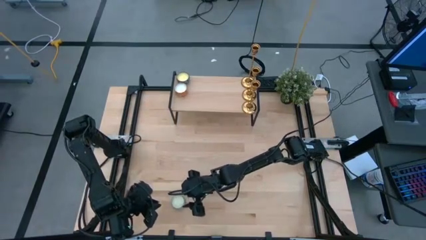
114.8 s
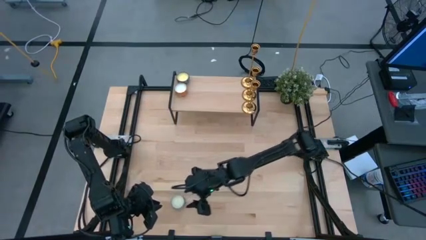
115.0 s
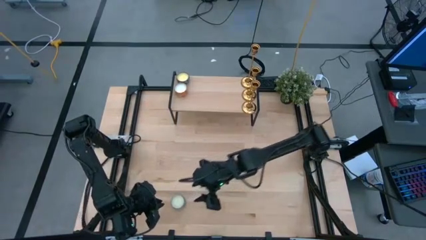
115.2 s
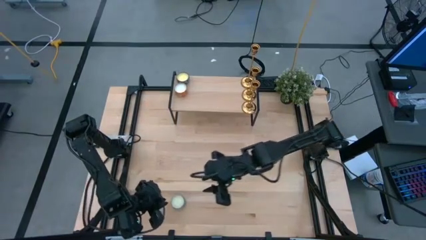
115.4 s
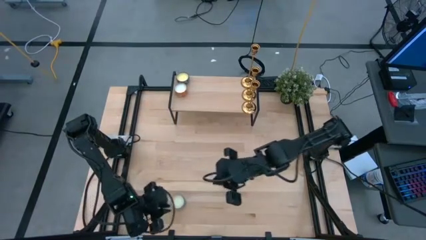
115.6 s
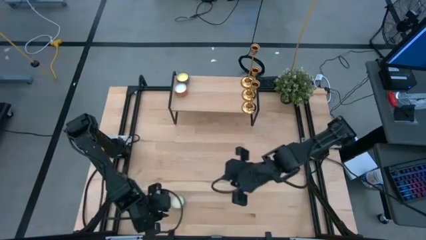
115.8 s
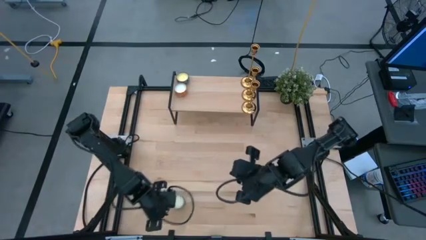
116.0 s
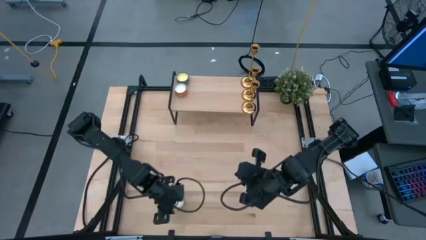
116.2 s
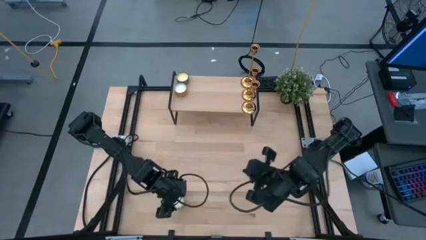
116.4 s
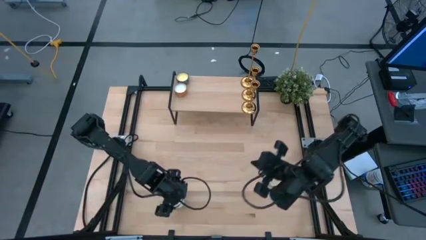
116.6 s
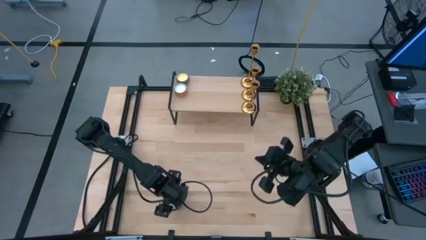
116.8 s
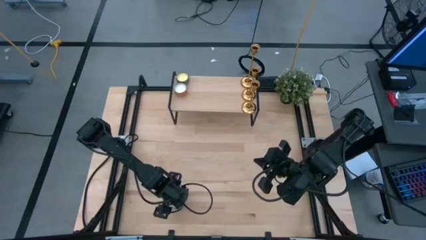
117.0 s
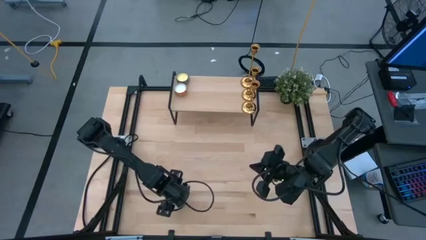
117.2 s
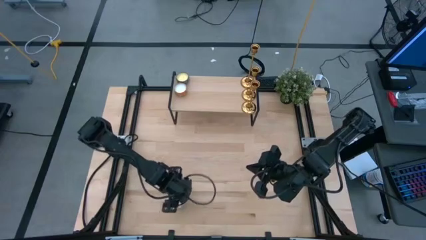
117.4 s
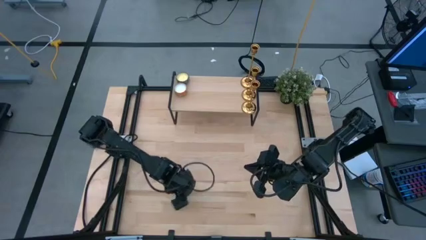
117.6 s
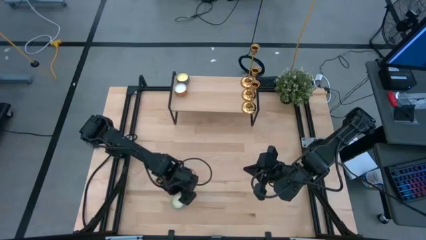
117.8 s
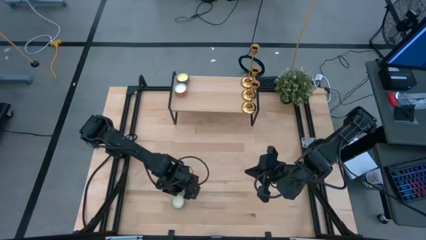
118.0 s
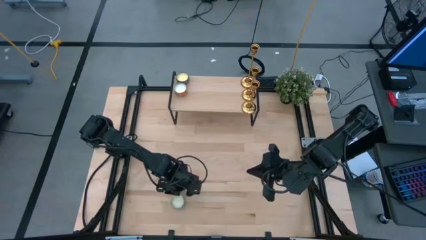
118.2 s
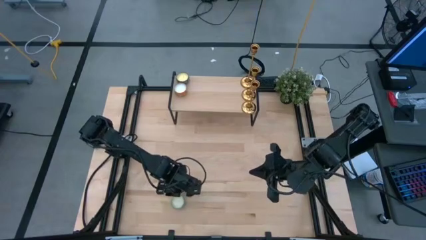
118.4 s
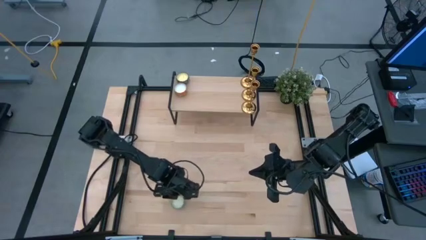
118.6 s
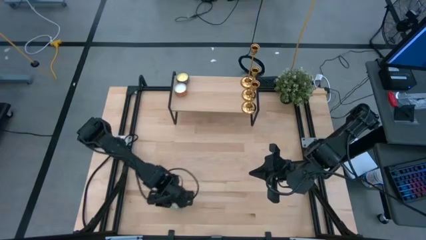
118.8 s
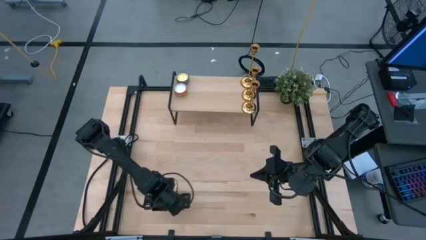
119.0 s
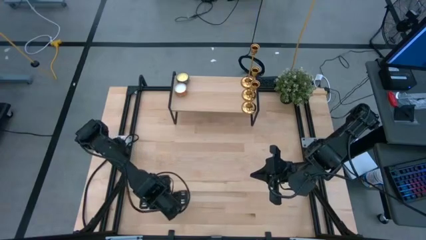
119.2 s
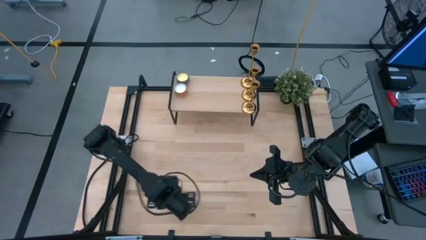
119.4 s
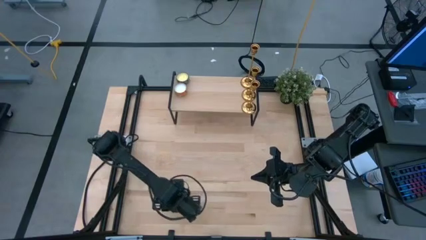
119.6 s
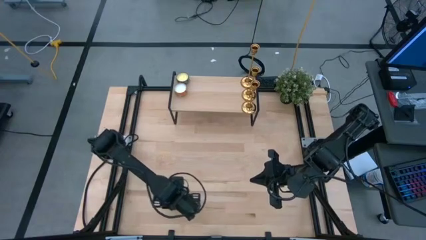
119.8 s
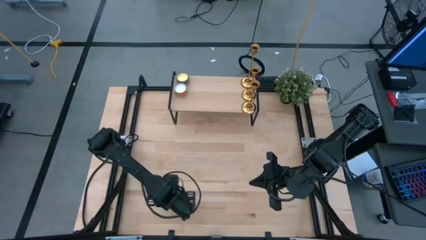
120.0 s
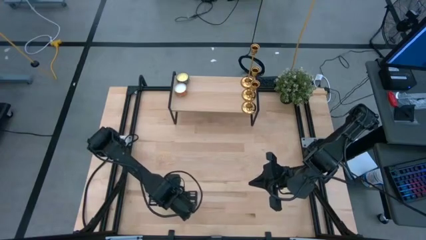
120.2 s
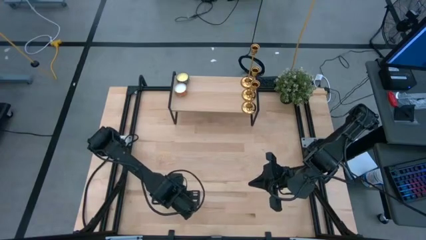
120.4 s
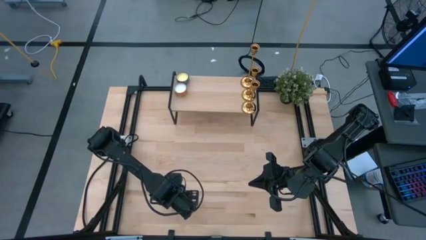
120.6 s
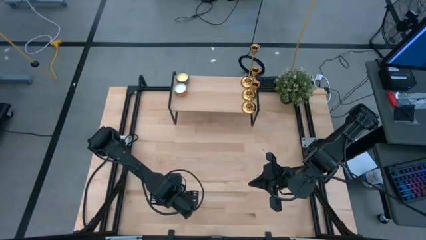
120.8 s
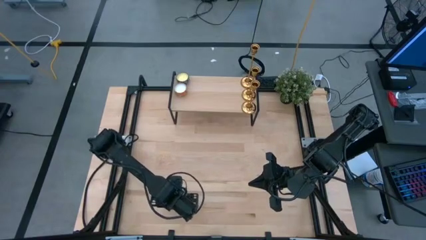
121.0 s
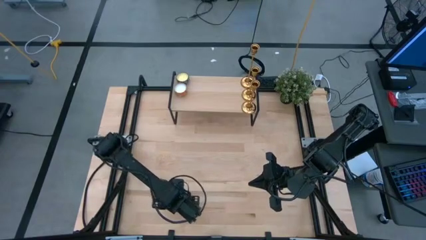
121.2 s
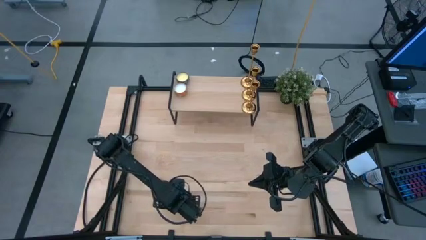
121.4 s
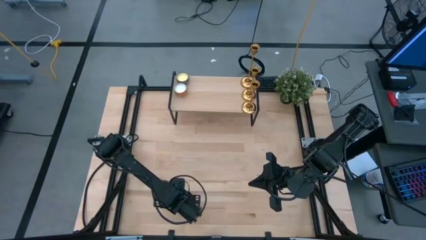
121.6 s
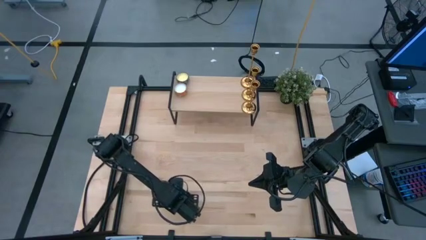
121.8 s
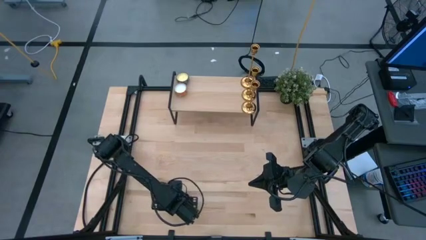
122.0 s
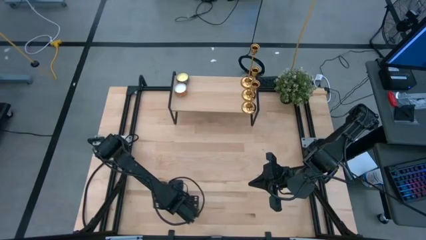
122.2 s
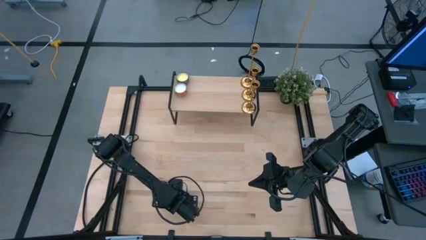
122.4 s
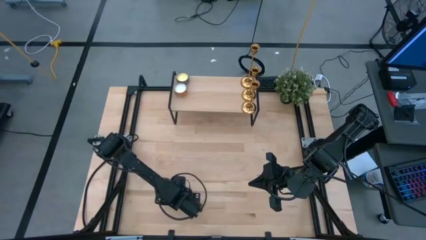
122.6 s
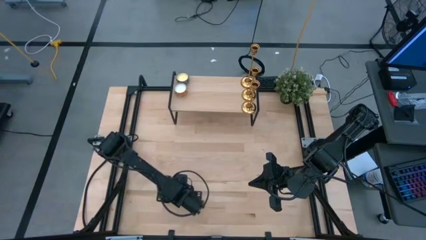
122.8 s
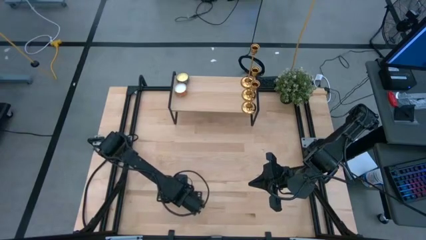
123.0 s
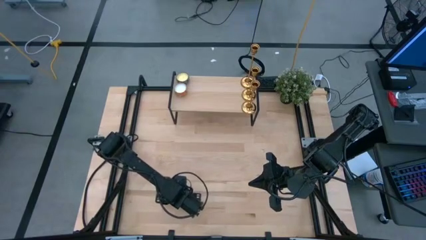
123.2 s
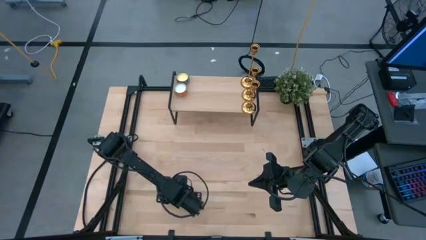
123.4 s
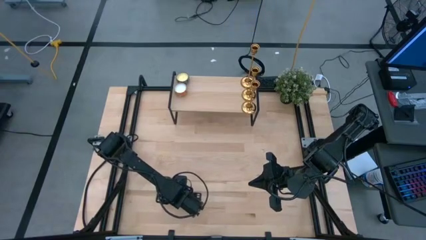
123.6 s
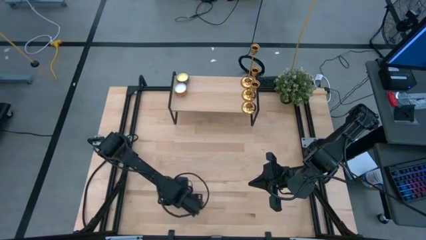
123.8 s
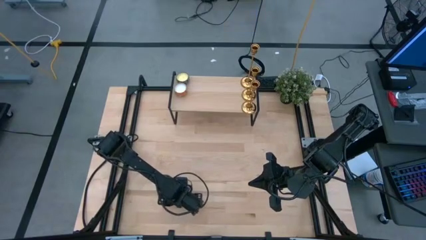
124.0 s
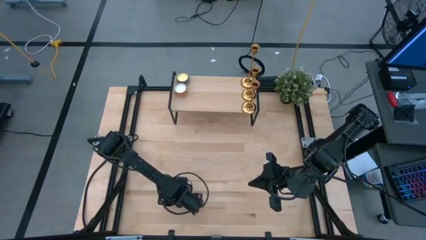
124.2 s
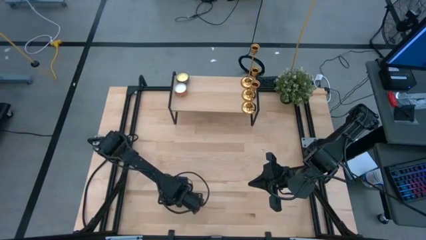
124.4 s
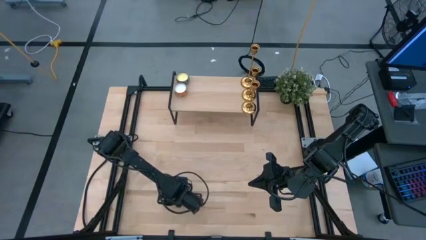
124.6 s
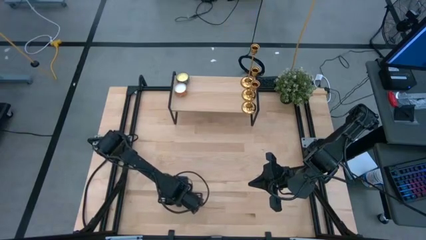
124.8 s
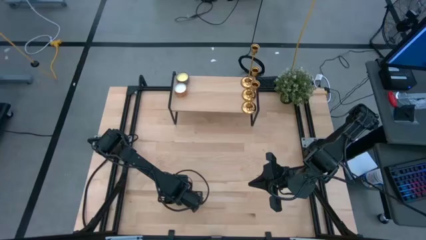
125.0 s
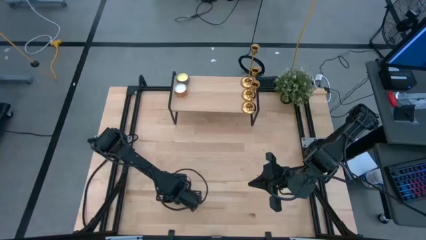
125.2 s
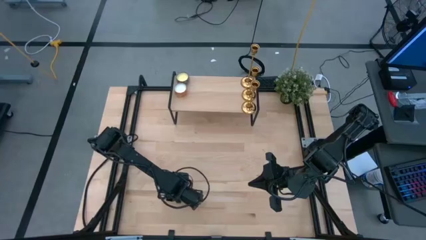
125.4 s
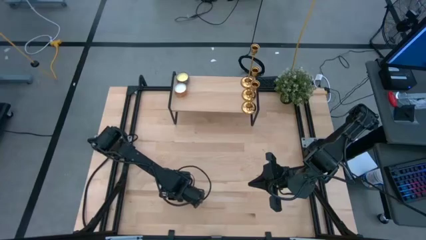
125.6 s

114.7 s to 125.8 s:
Task: Pick & Place candle stick holders
Put the white patterned scented candle on the shelf aligned with the yellow patterned scented candle

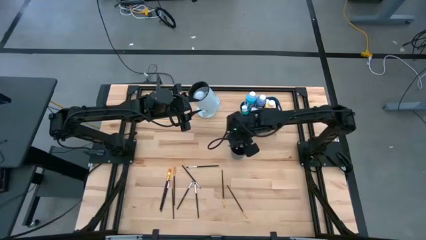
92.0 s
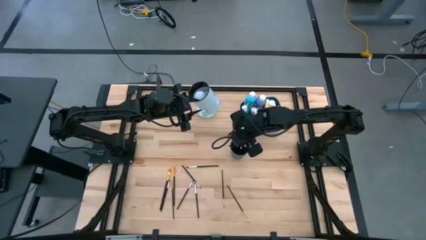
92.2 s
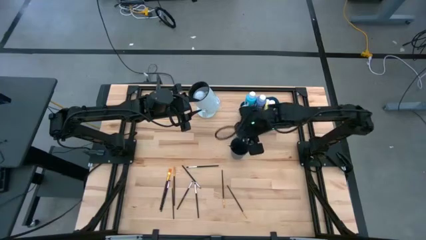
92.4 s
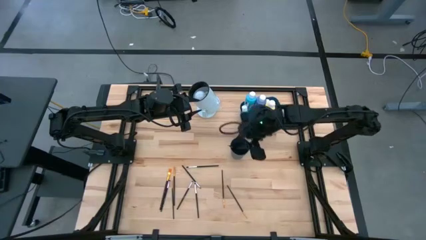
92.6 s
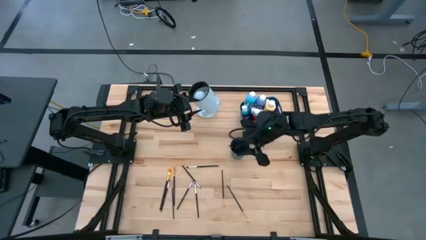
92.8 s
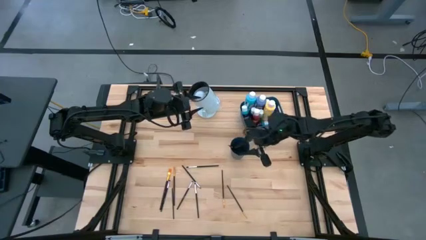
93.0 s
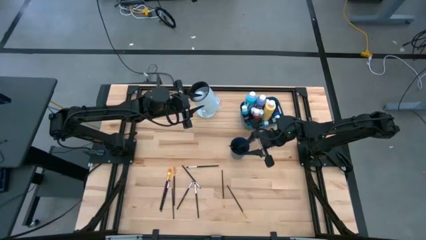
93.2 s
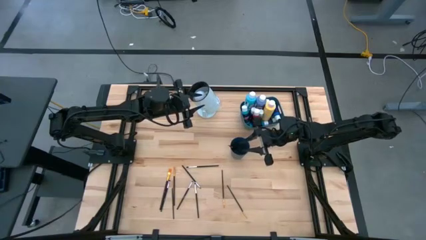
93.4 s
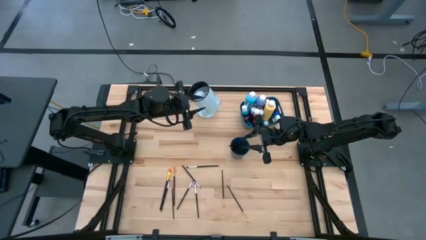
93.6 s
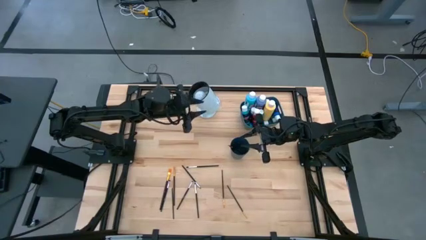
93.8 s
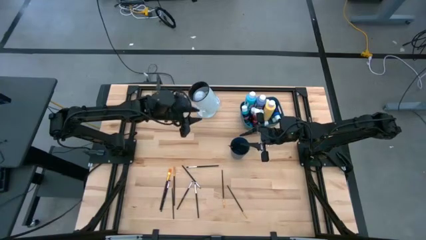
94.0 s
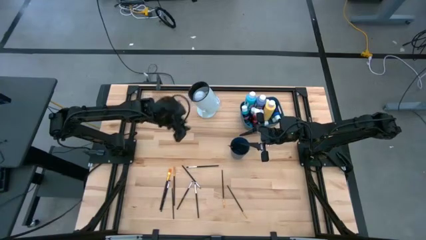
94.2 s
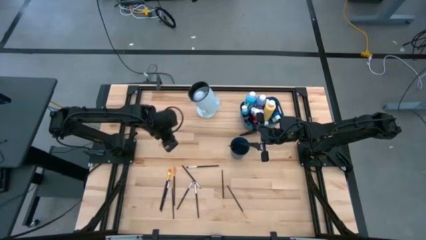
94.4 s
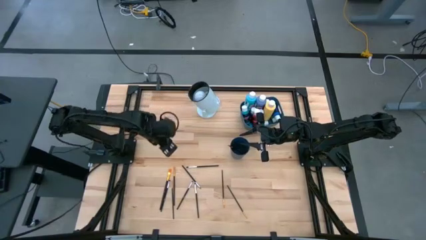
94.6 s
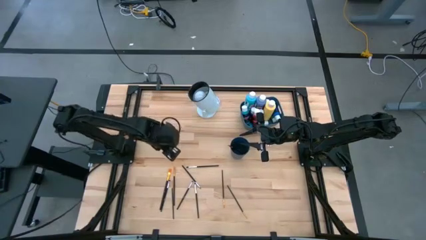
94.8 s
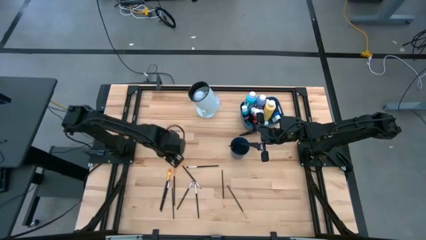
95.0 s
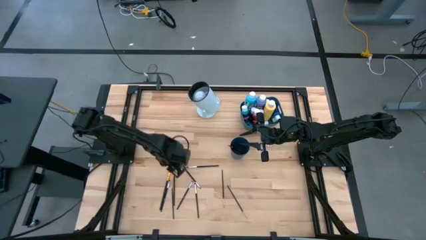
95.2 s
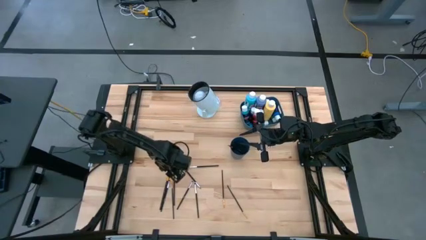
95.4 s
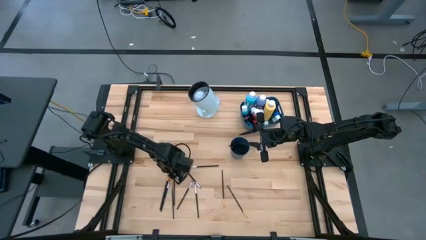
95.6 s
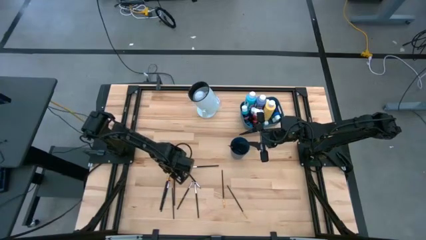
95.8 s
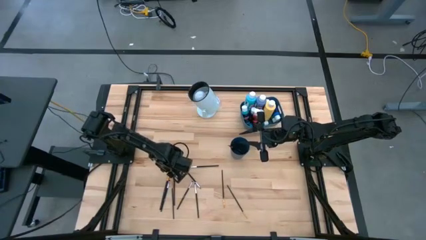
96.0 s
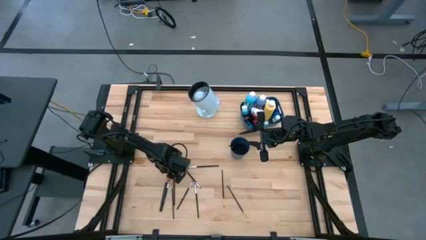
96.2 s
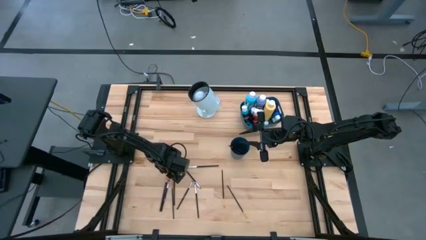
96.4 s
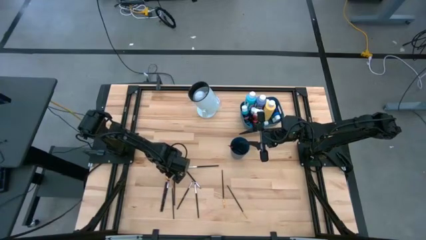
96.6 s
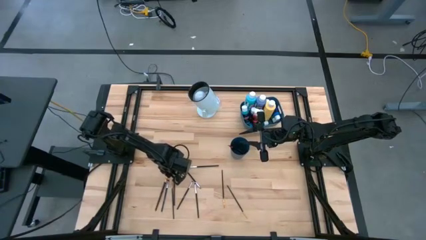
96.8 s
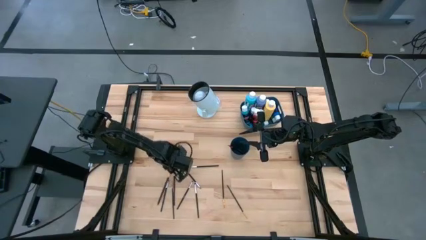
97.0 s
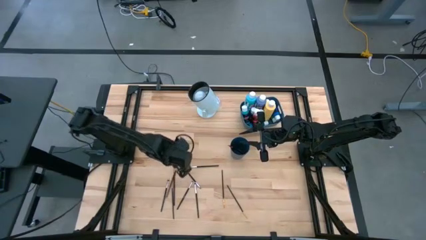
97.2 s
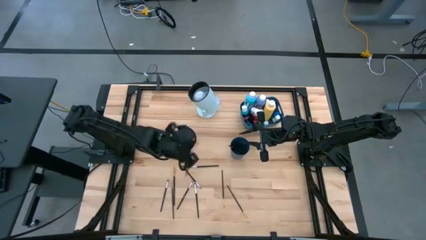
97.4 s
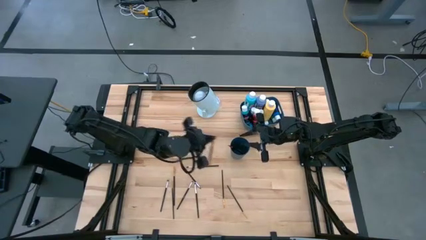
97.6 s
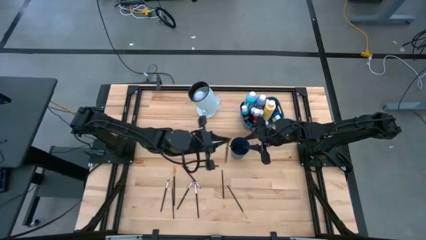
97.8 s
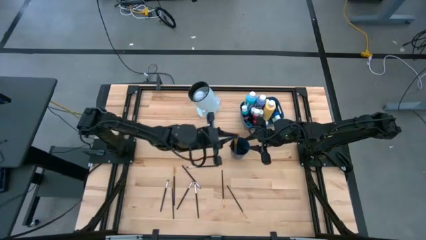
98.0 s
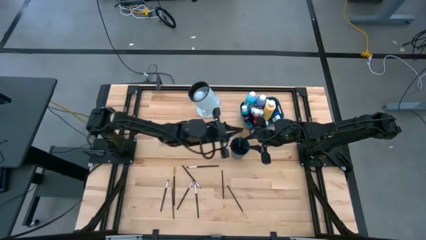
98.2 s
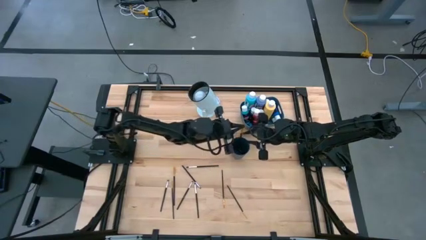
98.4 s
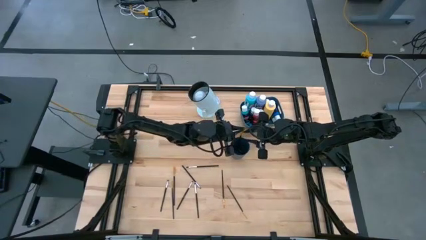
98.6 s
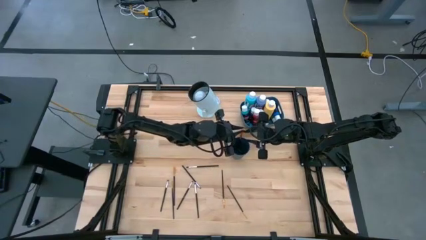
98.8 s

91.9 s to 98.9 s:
Task: Pick & Place Paint Supplies
Put the gold paintbrush into the blue cup
